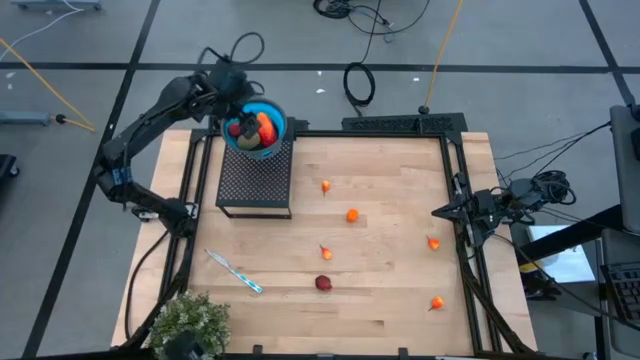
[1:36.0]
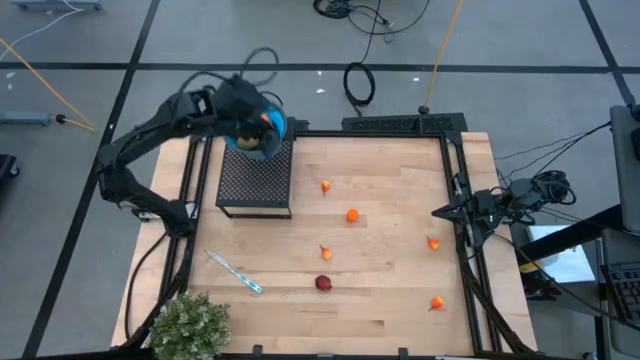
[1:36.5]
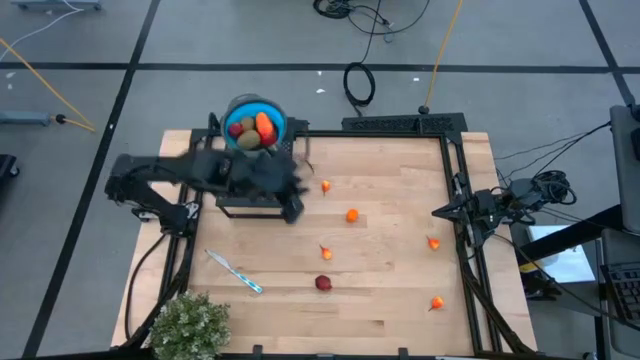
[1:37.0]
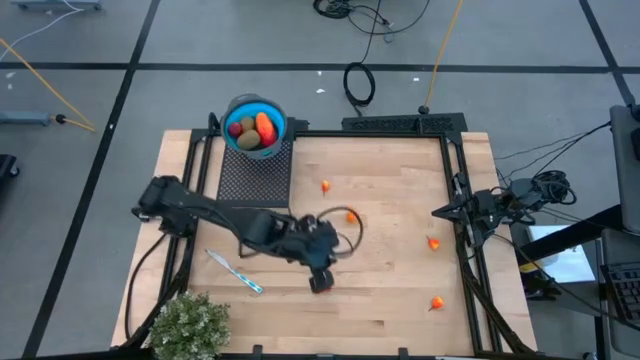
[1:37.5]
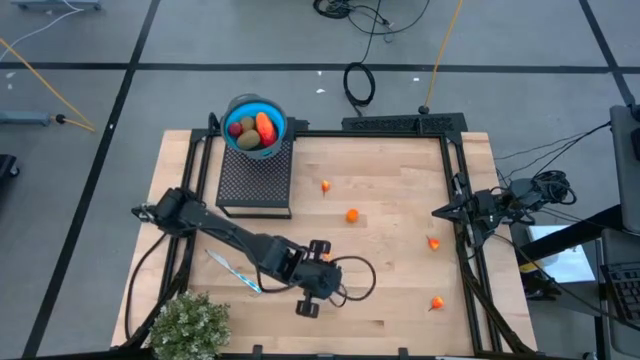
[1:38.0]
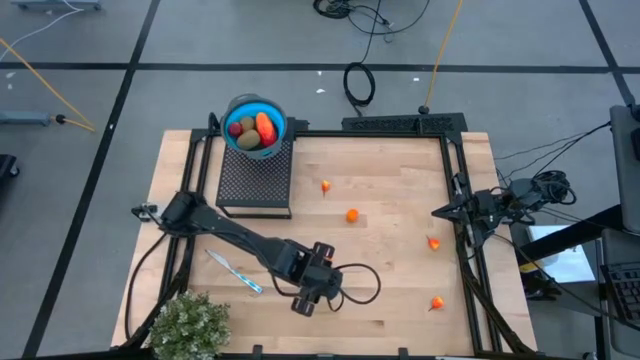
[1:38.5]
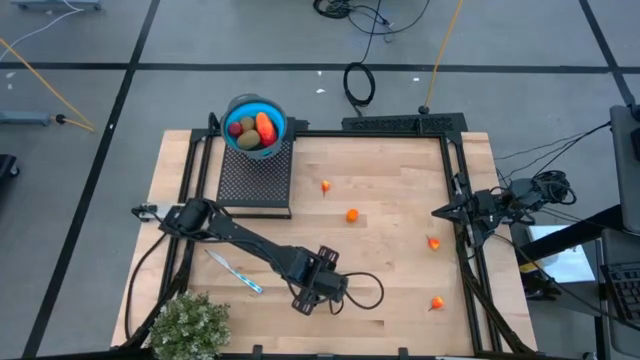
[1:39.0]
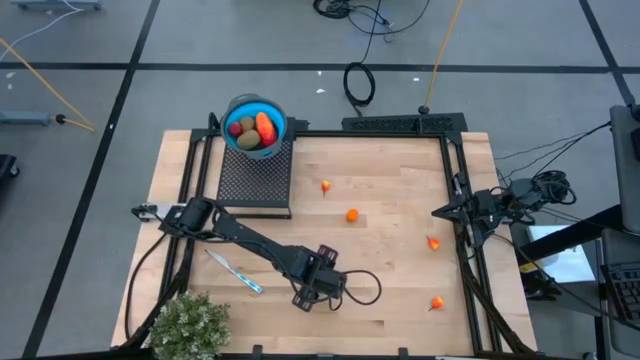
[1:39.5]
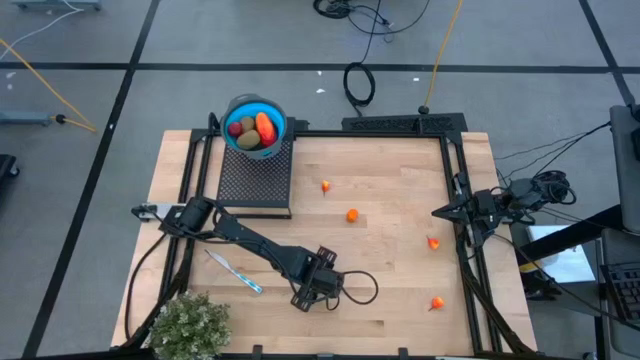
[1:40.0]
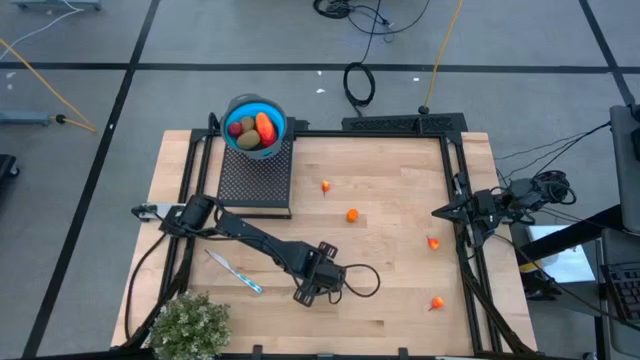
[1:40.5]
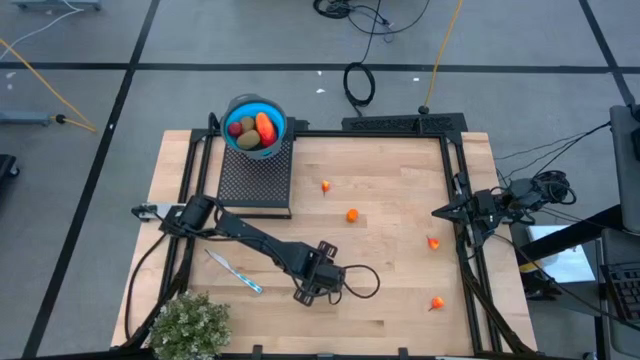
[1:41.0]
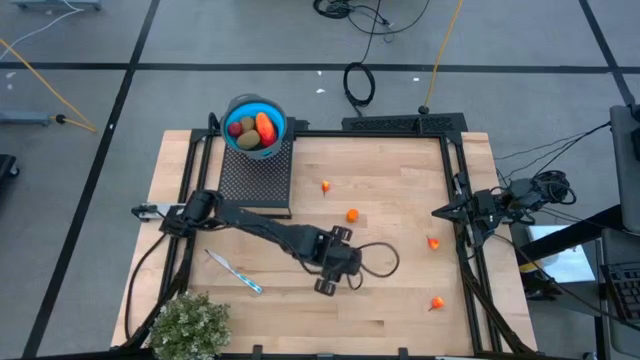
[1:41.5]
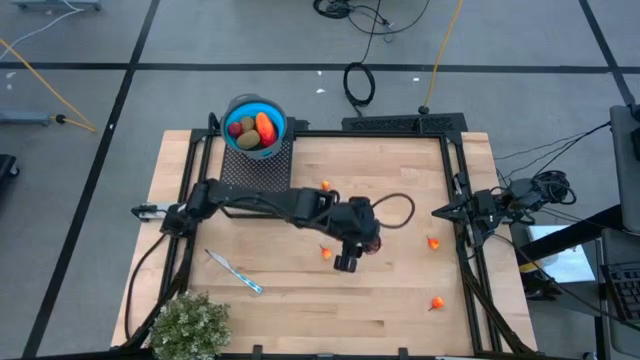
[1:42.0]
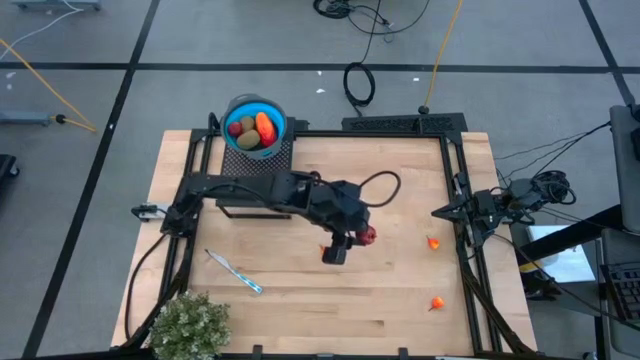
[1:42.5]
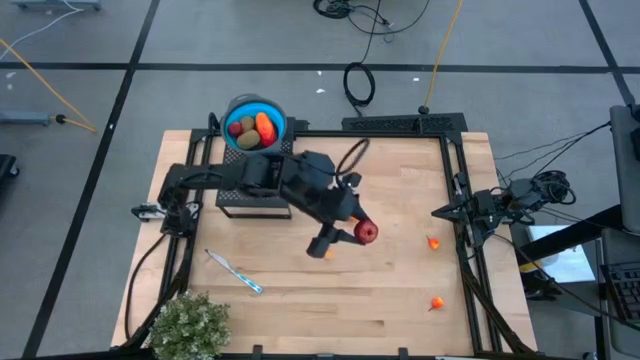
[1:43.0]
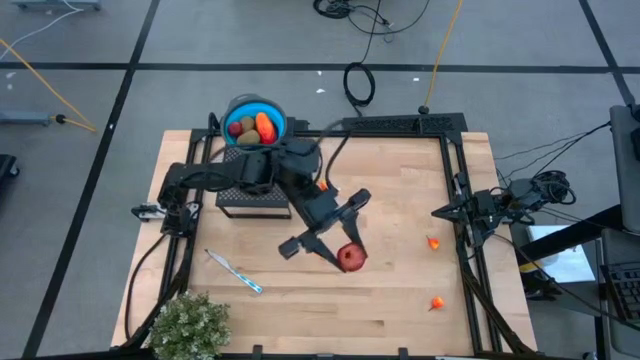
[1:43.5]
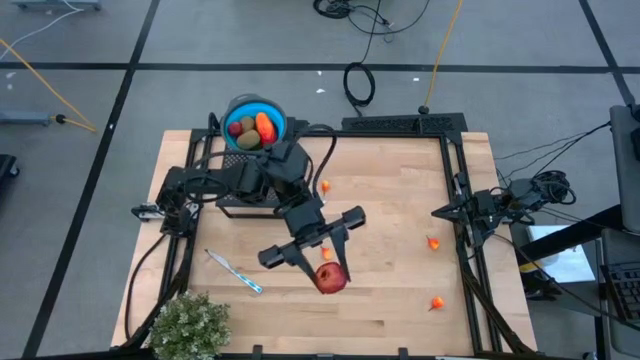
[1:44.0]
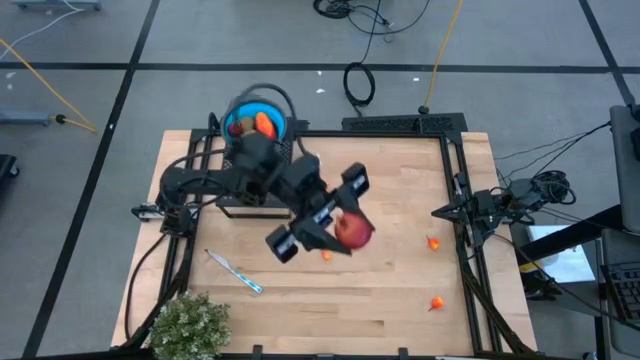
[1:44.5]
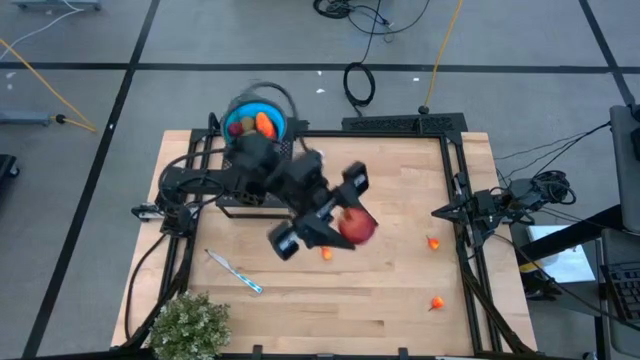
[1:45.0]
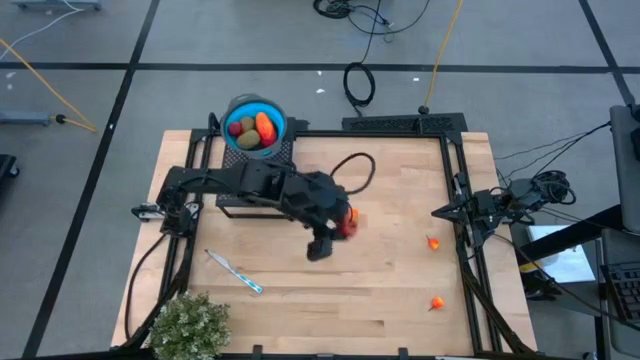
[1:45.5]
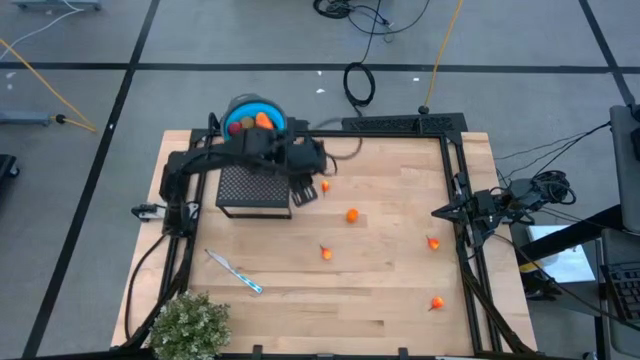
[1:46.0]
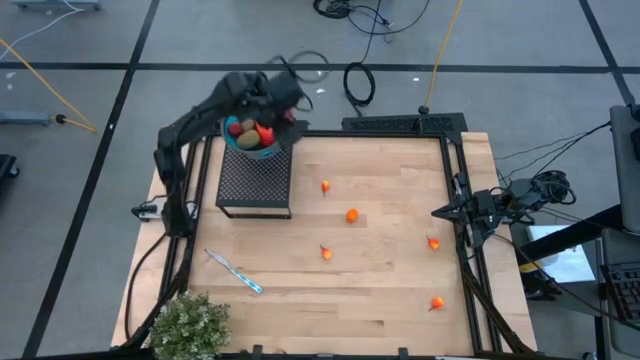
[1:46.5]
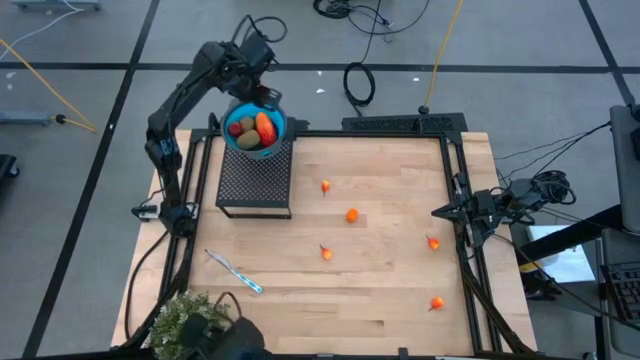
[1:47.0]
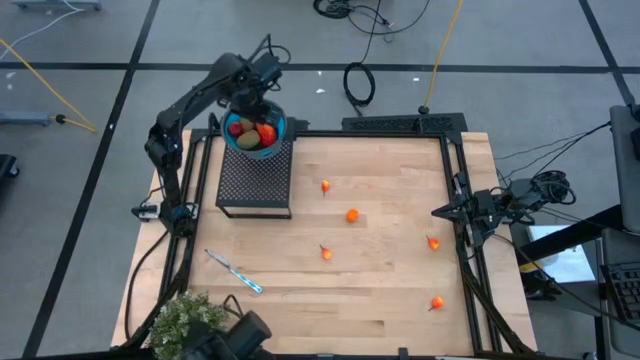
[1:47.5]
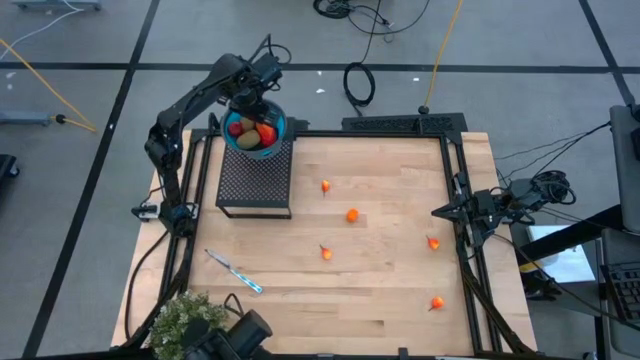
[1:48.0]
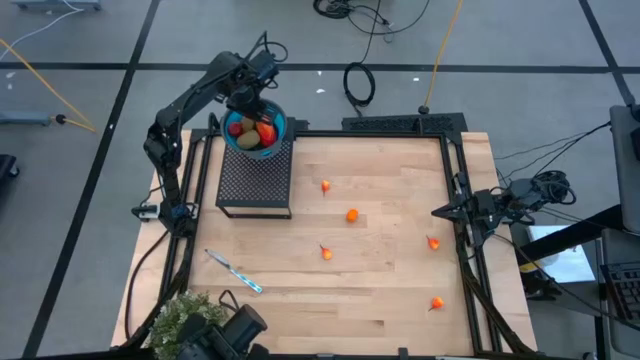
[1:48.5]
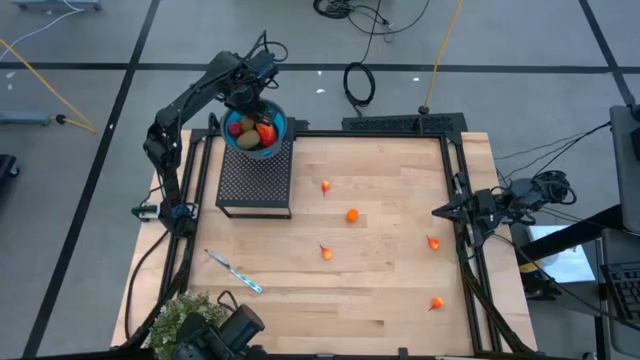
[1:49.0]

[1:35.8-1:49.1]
Task: Pick & Place Fruit
Put the pomegranate into the blue strainer bowl on the shelf

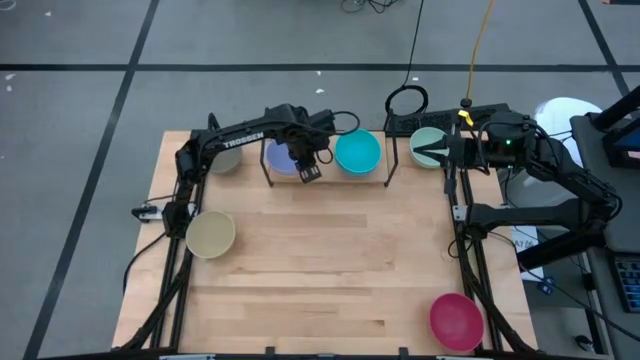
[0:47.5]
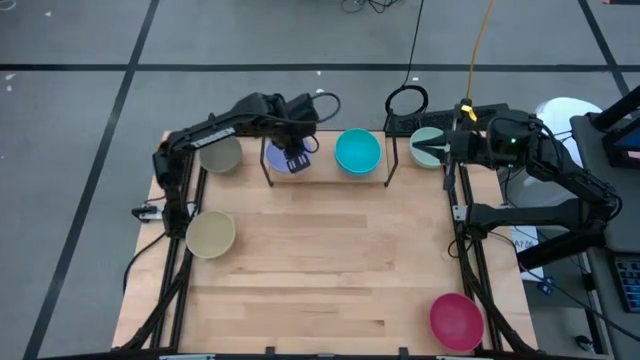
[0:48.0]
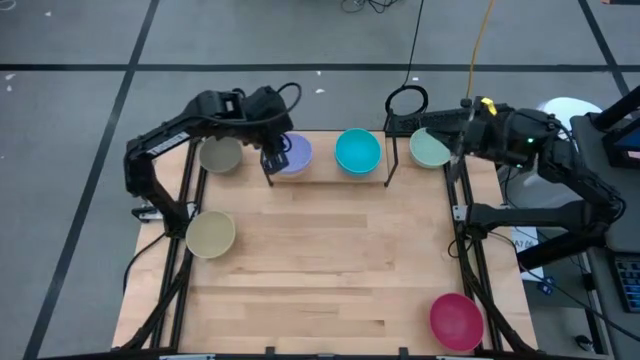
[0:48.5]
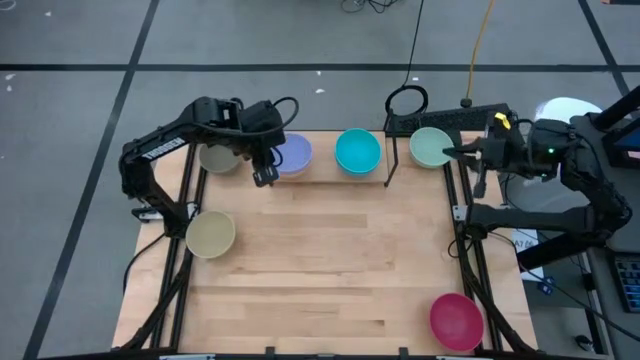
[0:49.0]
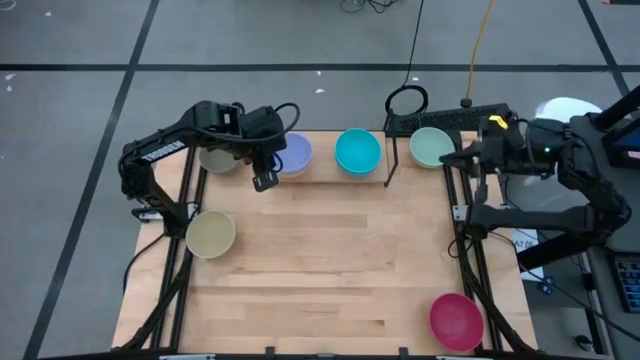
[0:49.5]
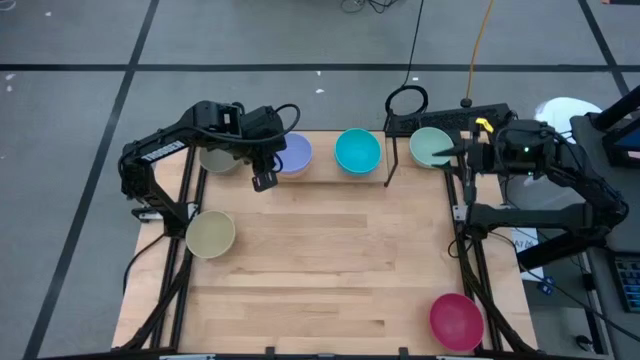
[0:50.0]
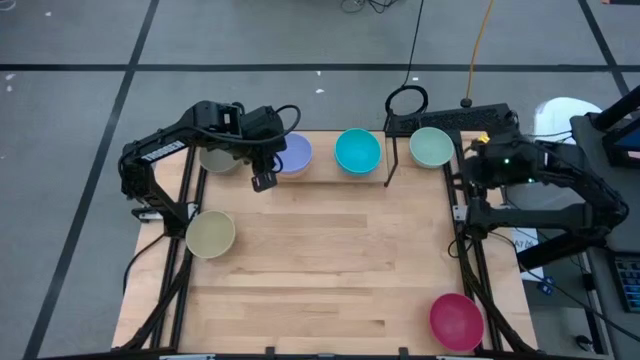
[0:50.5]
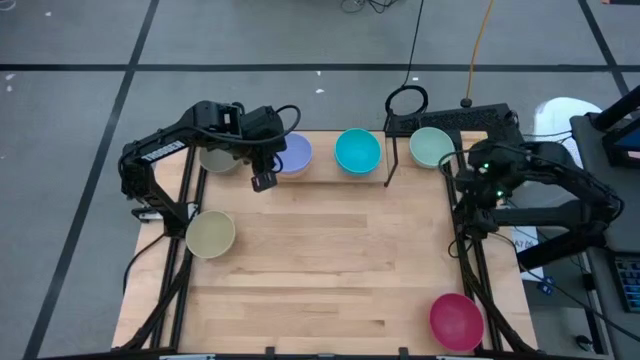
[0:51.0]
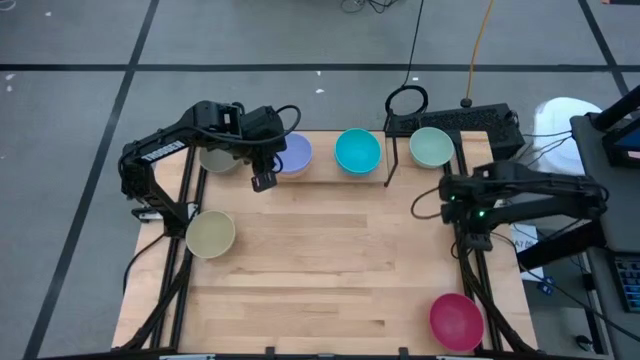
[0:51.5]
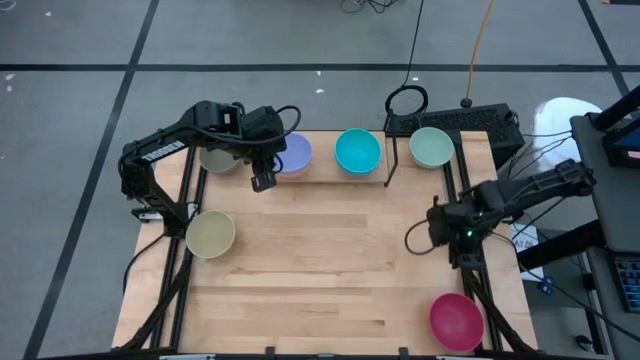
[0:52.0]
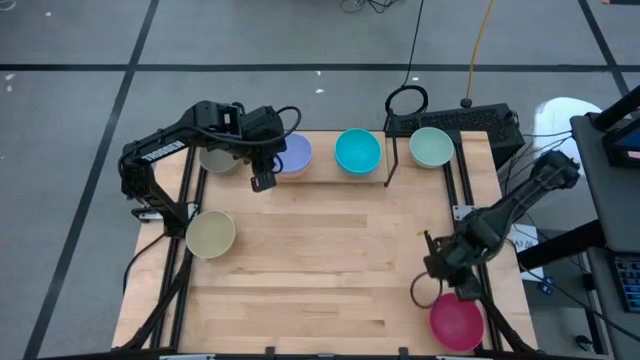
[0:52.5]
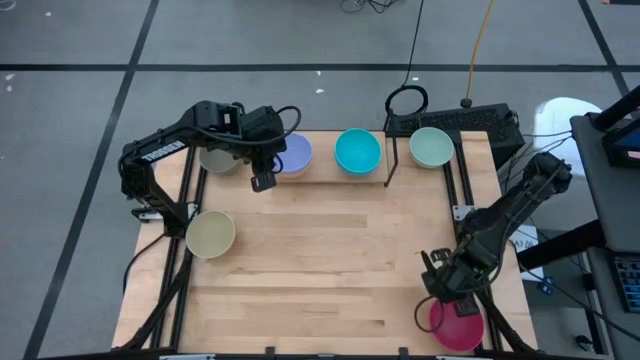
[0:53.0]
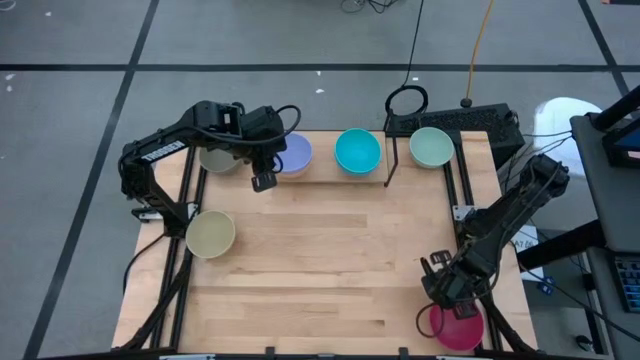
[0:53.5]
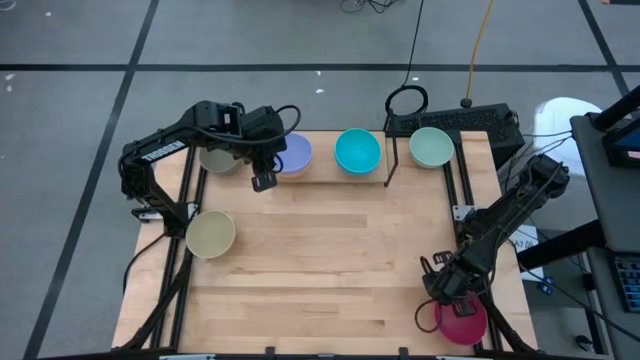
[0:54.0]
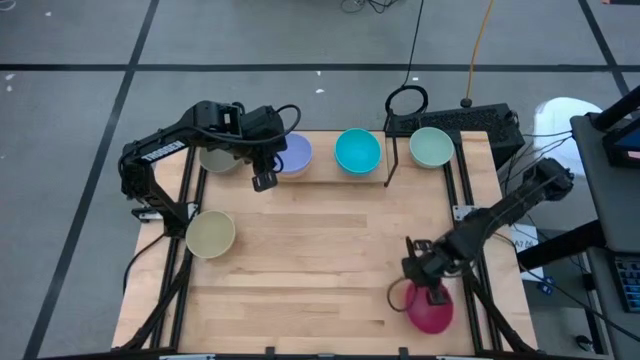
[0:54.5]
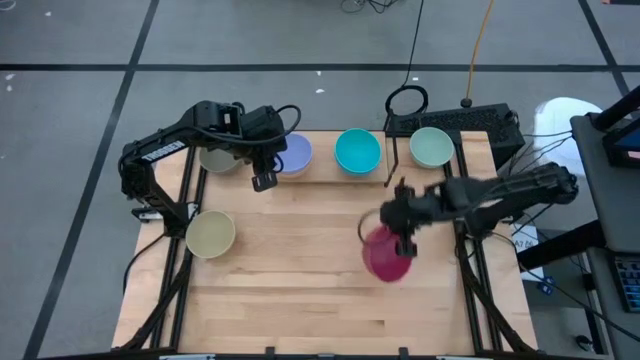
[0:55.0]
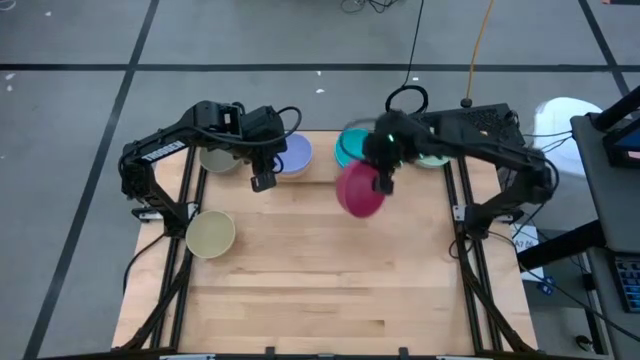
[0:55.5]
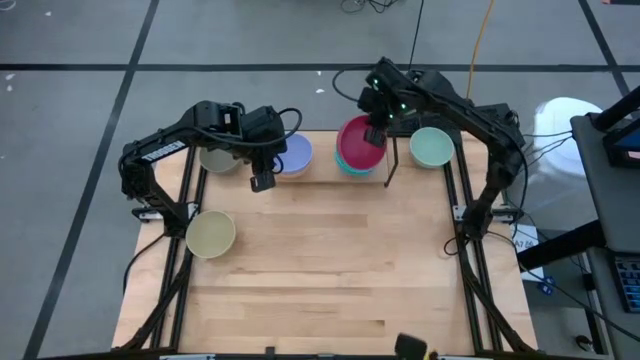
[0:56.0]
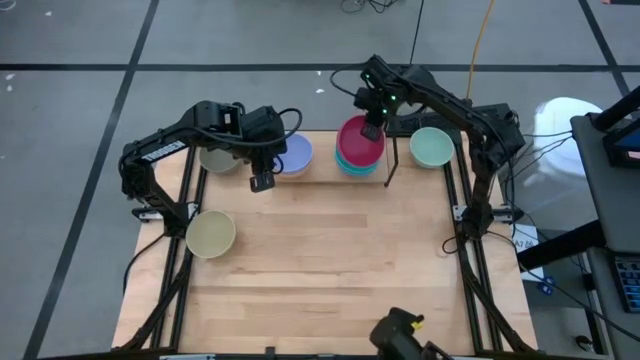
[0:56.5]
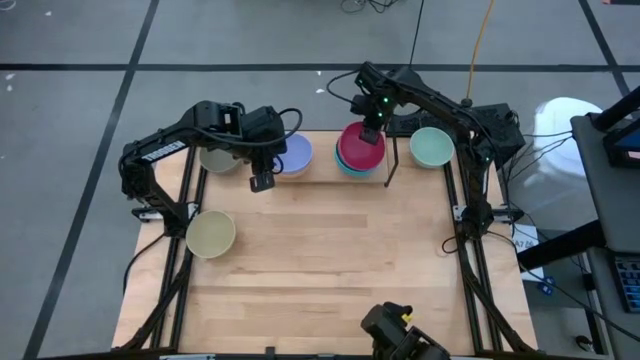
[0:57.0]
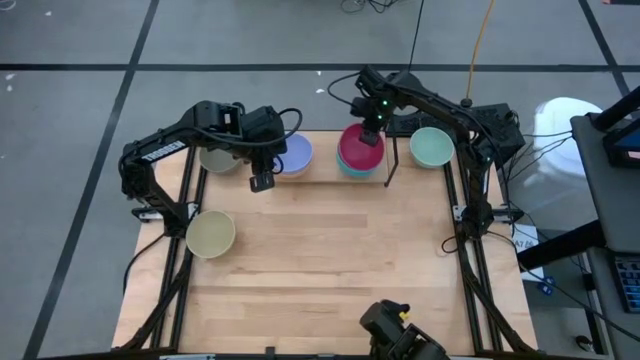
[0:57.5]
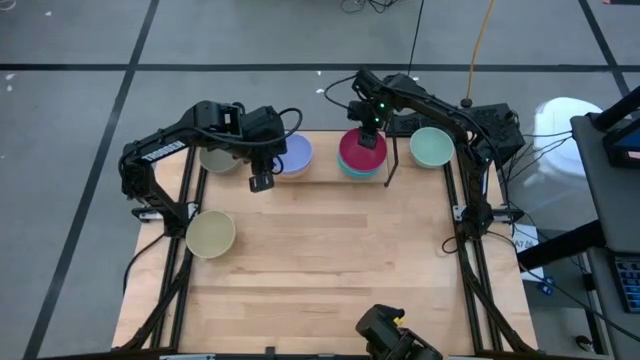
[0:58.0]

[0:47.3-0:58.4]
Task: Place and stack bowls onto a shelf
Stack the red bowl on top of the light blue bowl on the shelf
